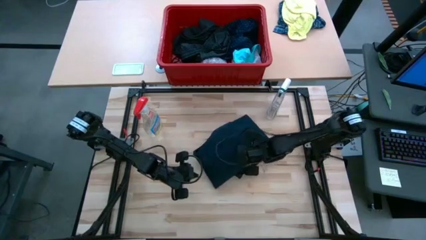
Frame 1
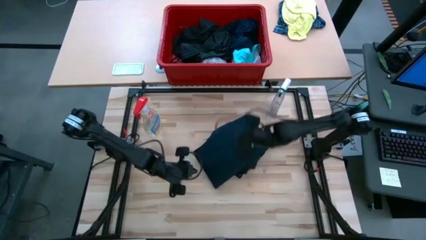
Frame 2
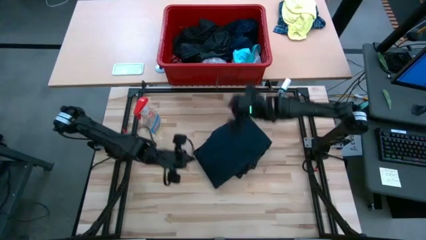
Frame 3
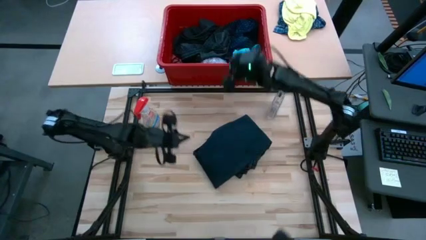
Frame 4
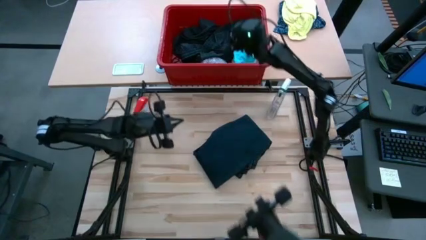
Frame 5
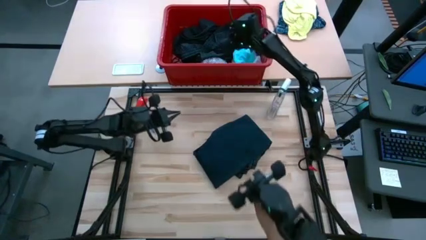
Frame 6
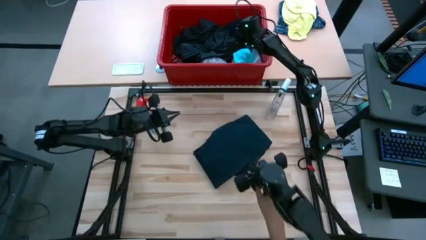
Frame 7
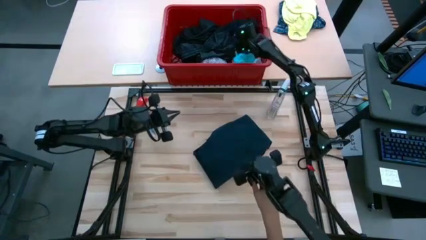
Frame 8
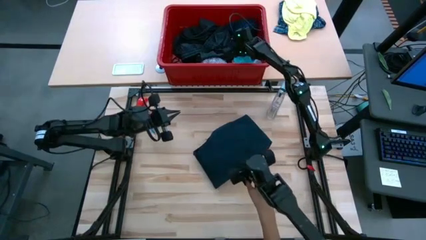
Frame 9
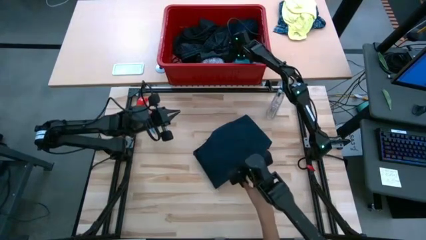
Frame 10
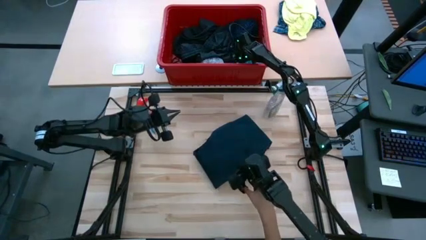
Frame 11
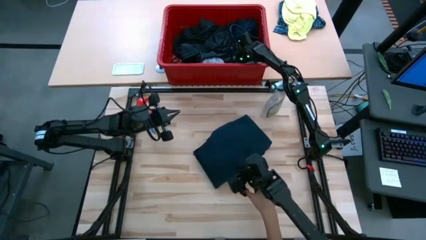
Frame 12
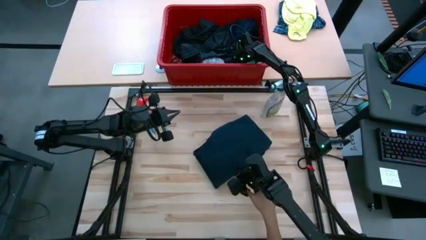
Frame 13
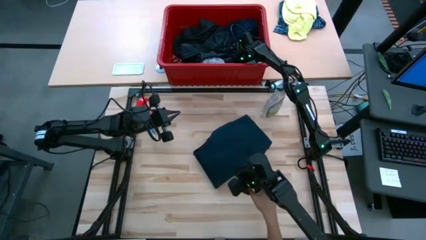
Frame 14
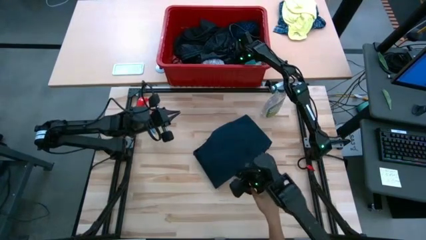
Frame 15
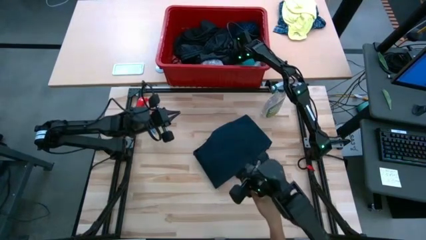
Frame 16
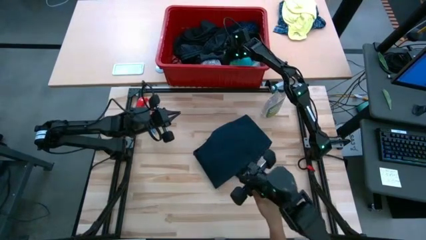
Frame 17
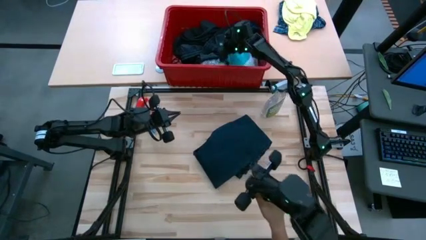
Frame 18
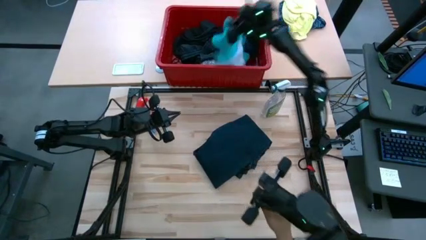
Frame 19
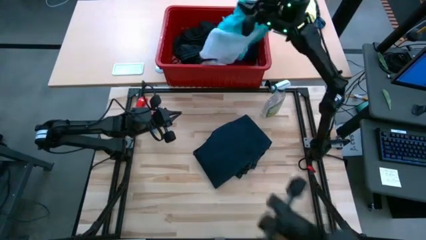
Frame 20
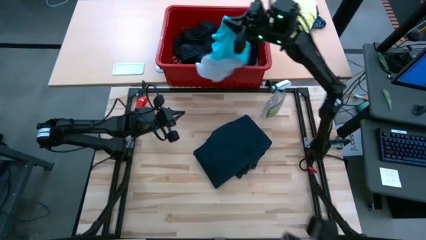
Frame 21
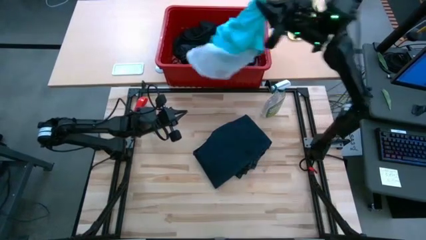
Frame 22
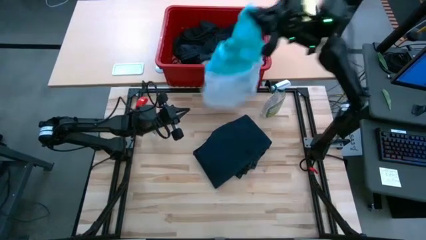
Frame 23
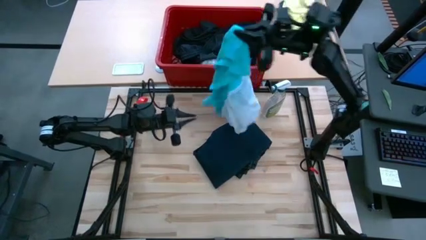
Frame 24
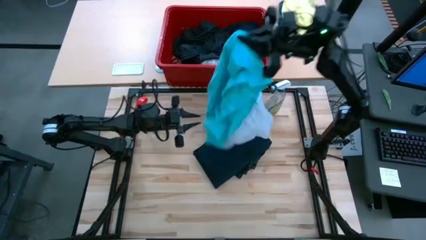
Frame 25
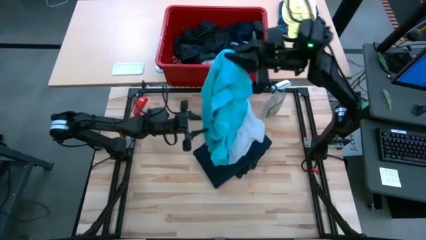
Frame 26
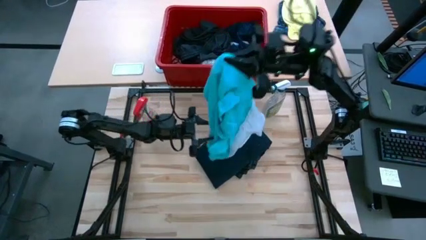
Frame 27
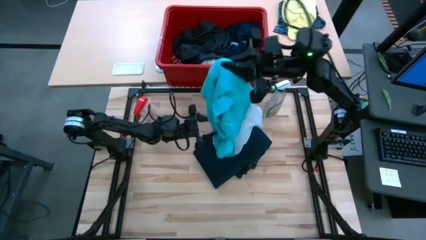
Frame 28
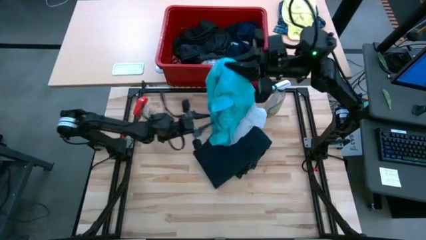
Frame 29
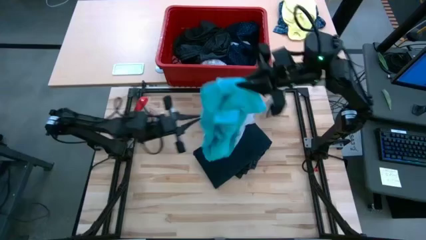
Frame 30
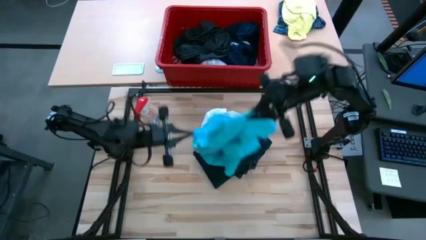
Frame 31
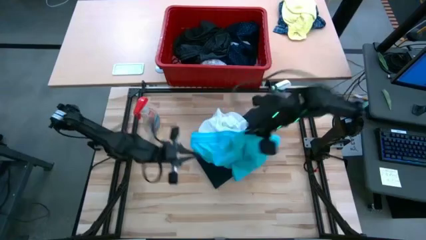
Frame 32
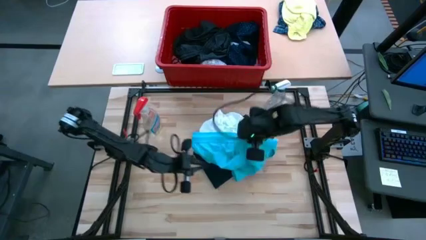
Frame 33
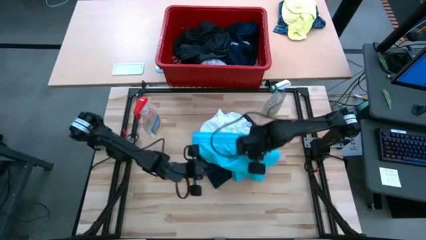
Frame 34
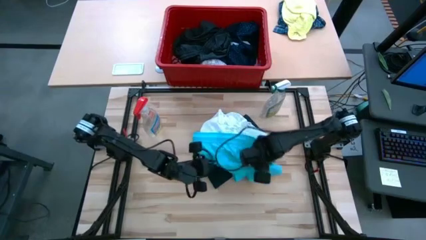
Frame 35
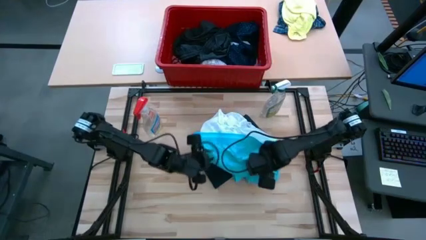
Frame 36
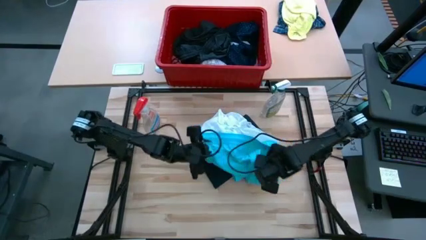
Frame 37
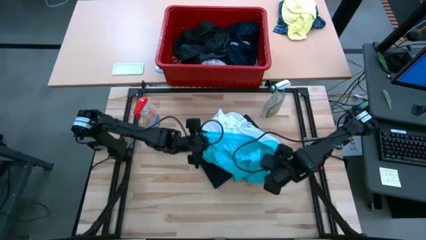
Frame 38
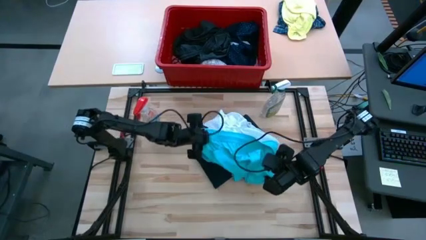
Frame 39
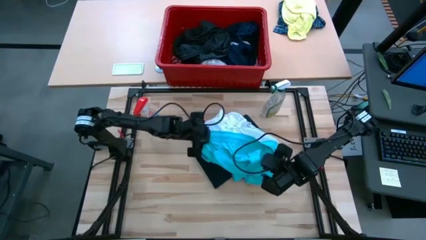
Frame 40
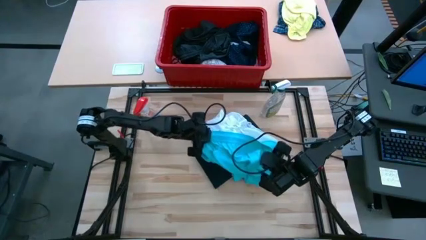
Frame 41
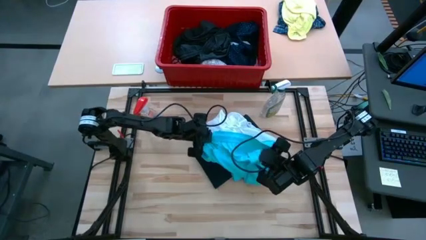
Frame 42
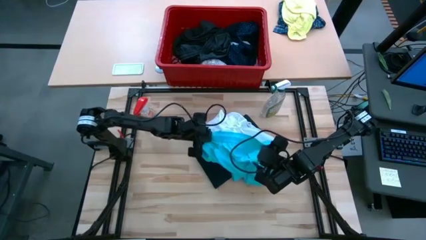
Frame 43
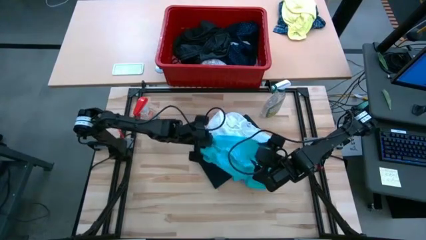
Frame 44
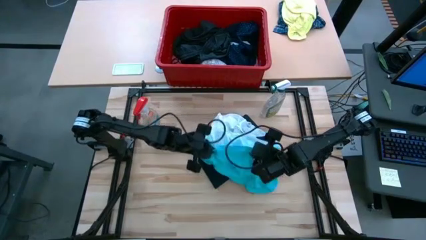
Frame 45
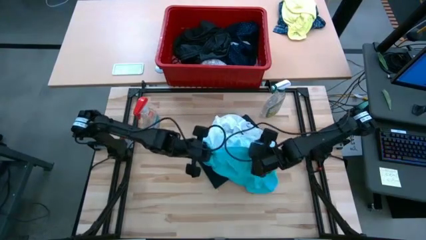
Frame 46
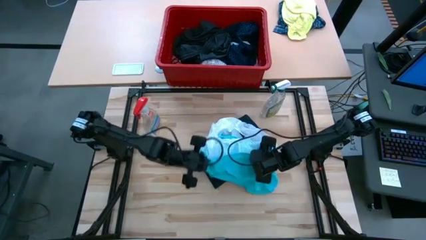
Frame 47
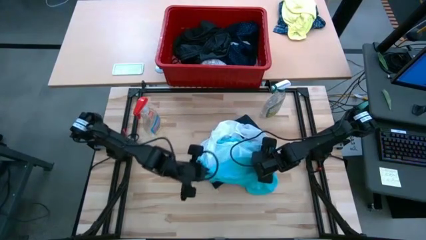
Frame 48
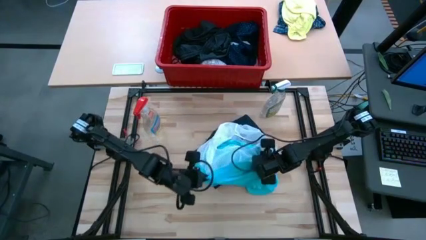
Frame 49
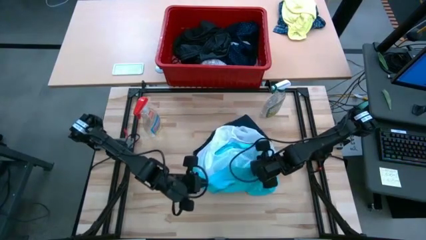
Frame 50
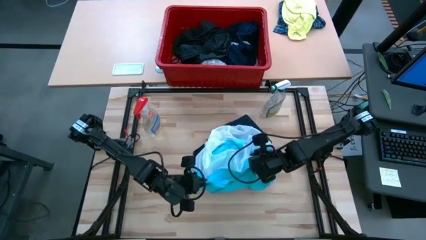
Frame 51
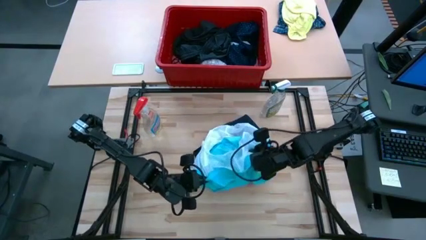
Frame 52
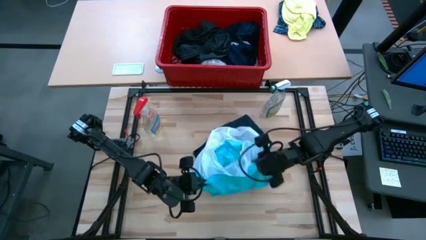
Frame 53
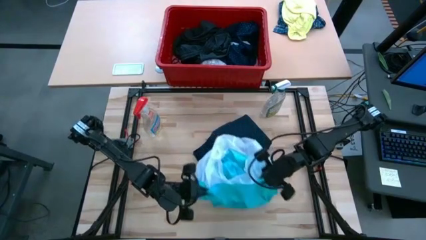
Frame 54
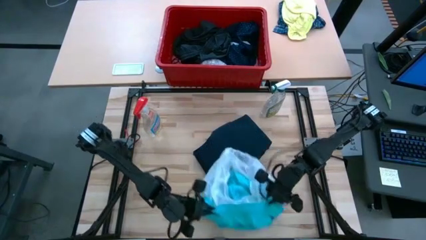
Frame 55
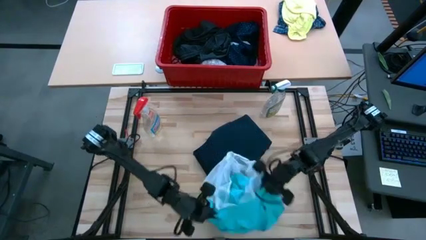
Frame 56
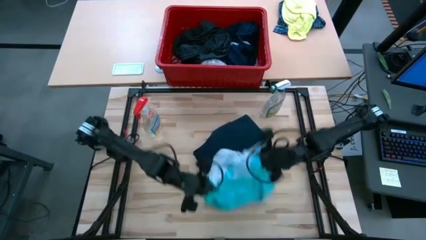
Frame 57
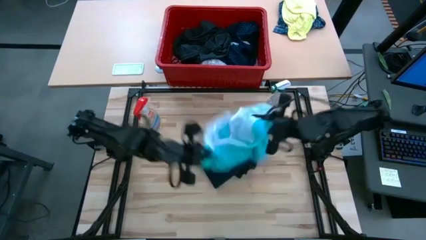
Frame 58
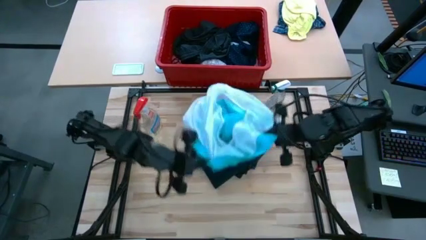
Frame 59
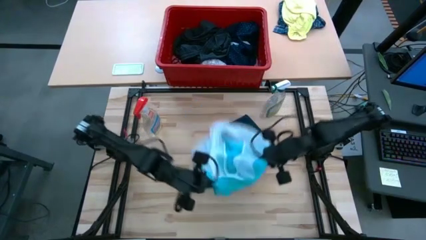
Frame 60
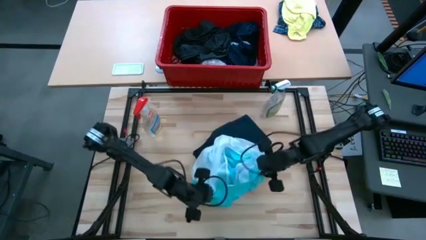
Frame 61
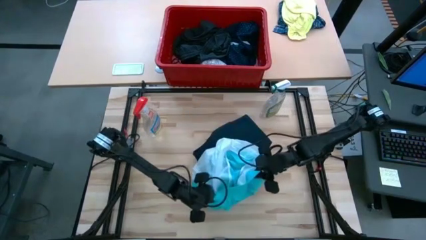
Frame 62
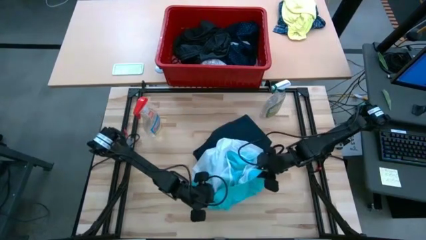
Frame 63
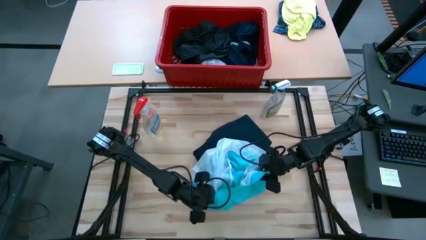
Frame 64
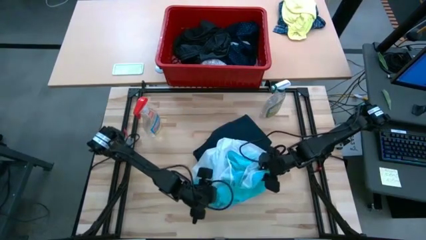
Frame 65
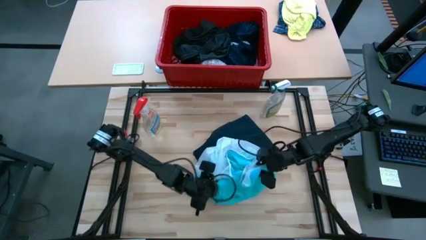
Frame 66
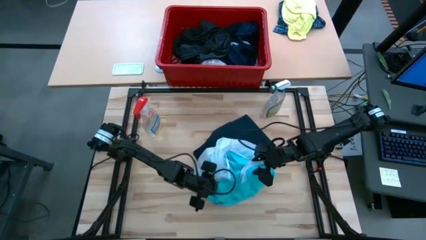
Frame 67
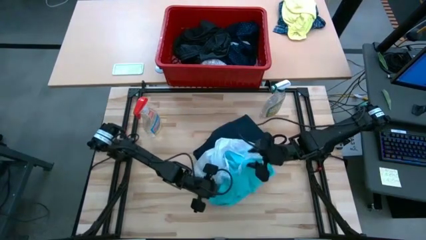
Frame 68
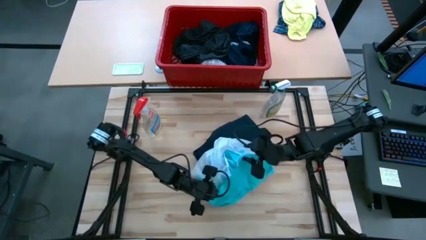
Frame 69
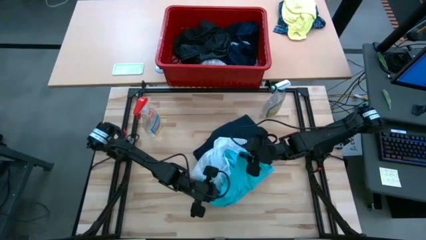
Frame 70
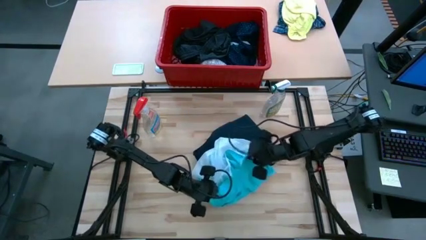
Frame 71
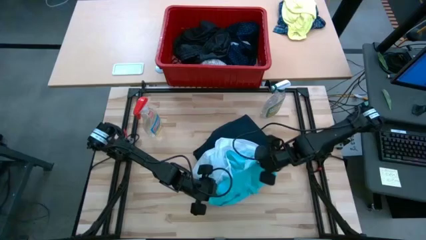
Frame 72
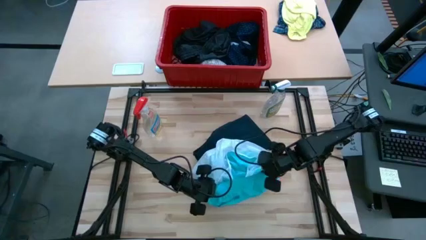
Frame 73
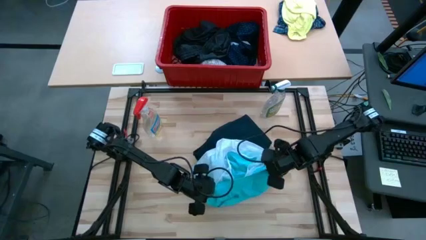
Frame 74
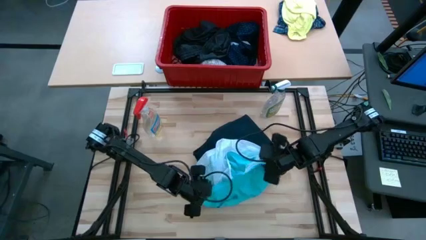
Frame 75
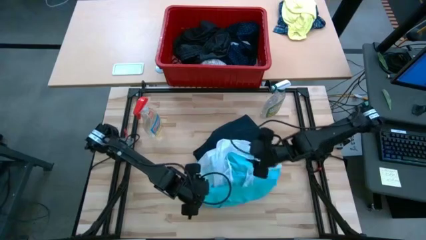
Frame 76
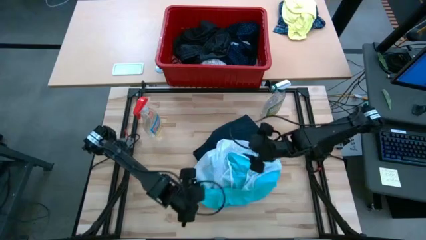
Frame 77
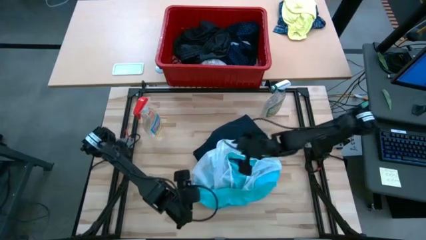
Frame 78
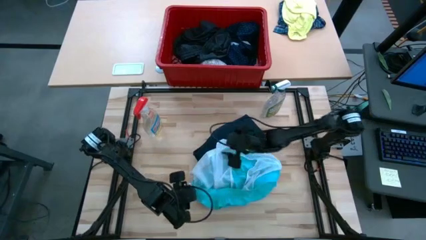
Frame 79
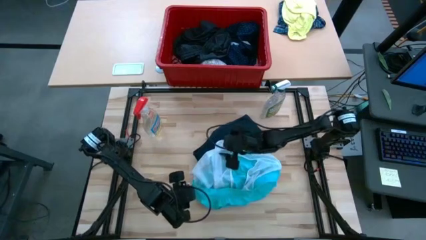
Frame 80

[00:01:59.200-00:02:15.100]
Task: Fold Laundry from Bin
Fold the light blue shorts
